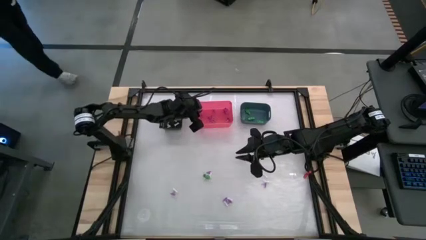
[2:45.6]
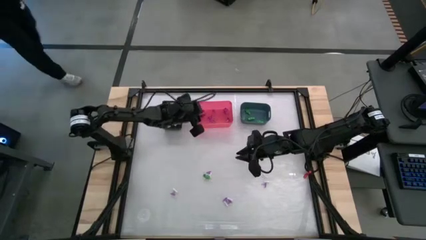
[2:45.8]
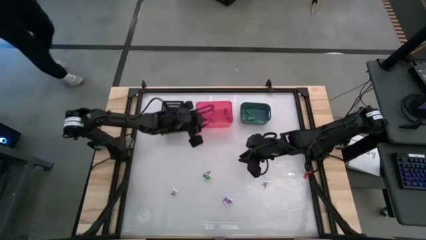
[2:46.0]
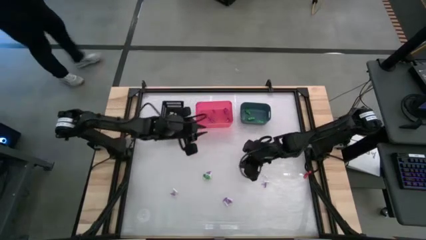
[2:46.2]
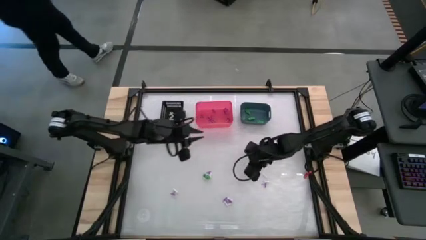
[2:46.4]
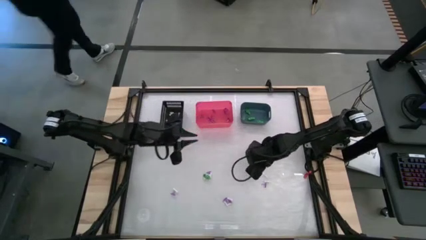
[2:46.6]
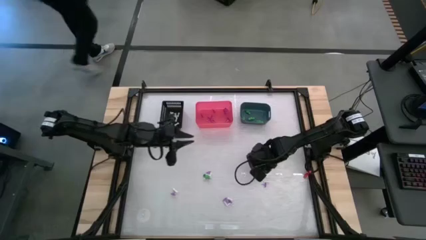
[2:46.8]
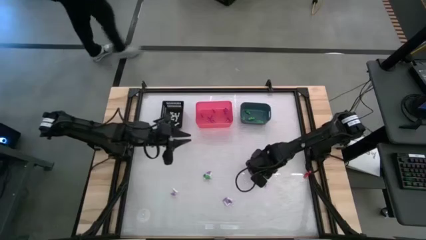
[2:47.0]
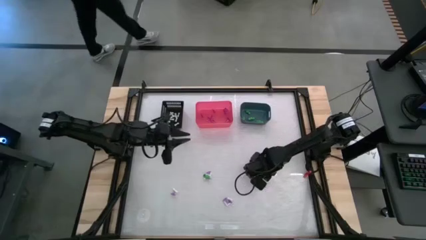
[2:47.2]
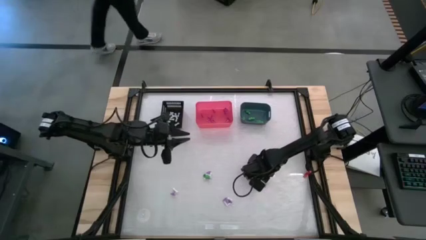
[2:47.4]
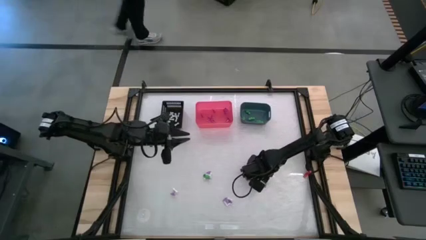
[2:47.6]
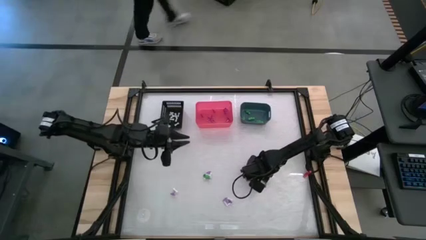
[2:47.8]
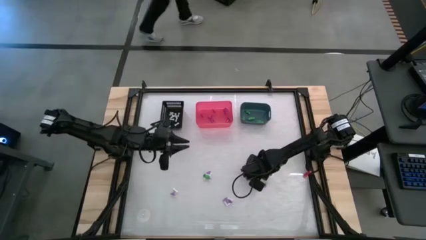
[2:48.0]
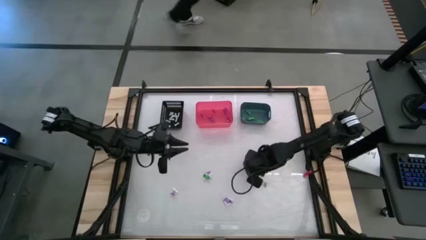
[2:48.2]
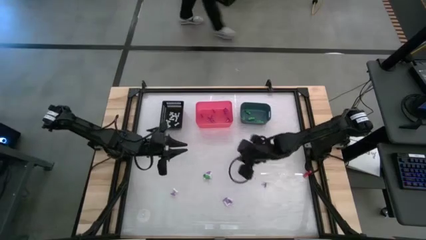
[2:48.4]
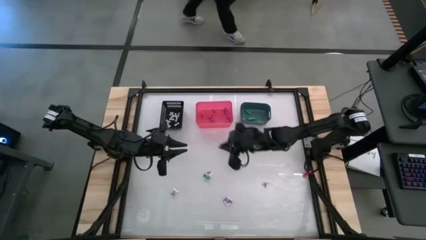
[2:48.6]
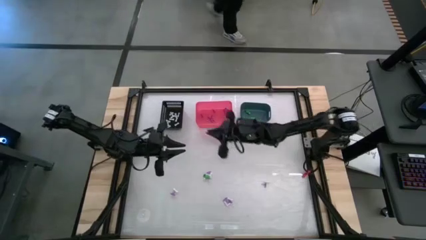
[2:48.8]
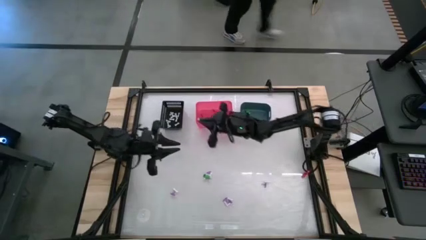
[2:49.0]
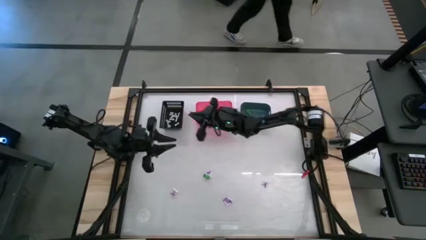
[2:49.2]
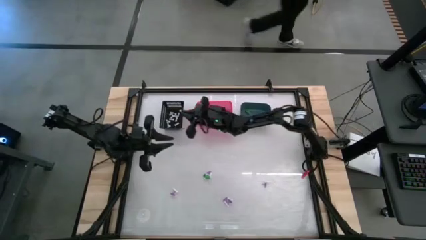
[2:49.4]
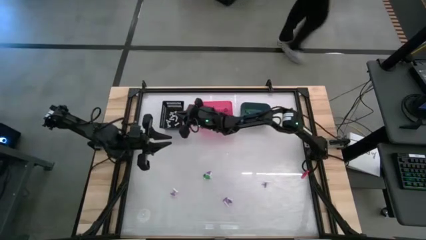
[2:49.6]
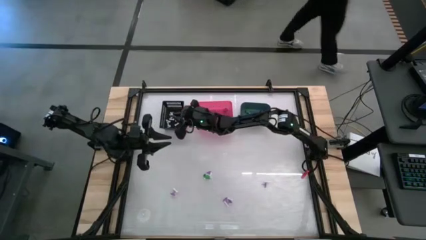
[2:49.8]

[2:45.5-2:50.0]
Task: Sort Halloween decoration
Put the white bone toy into the black bin

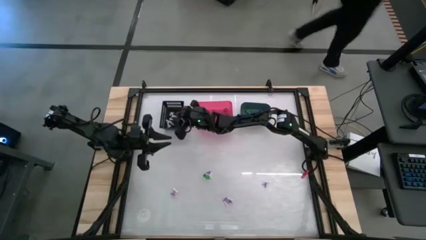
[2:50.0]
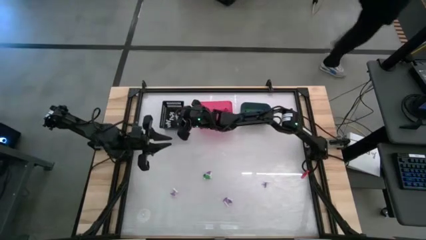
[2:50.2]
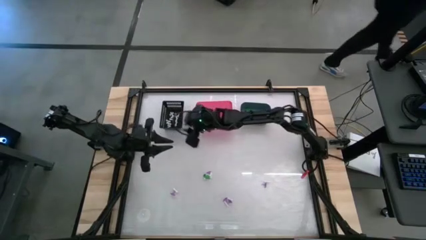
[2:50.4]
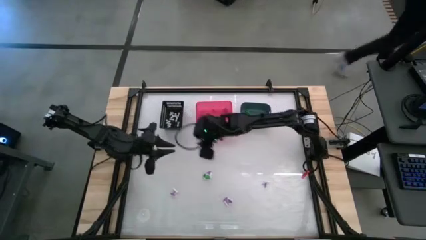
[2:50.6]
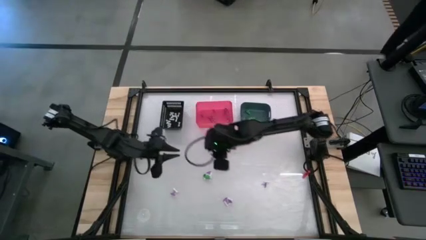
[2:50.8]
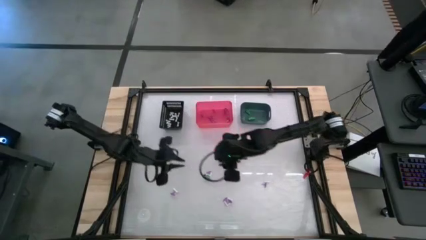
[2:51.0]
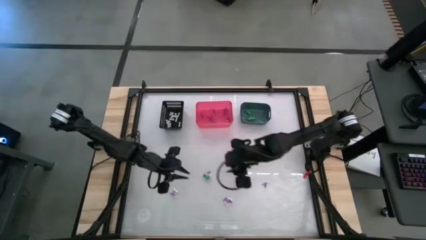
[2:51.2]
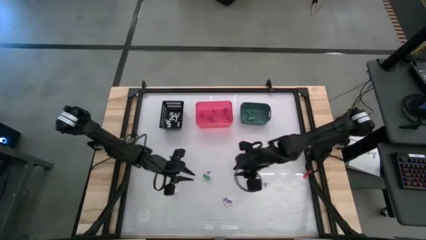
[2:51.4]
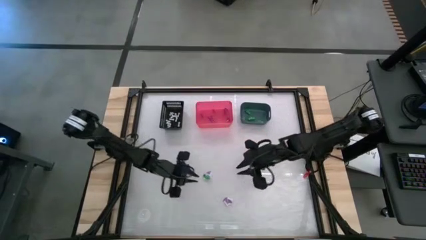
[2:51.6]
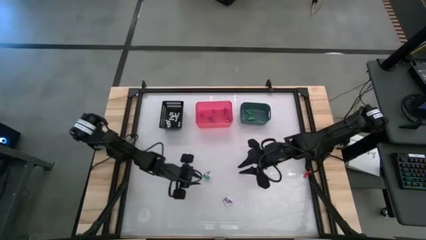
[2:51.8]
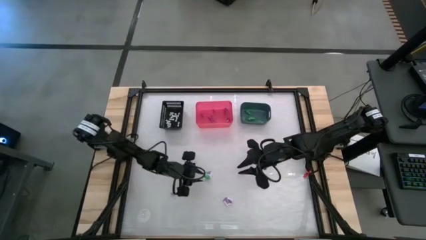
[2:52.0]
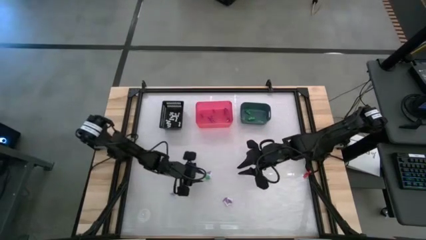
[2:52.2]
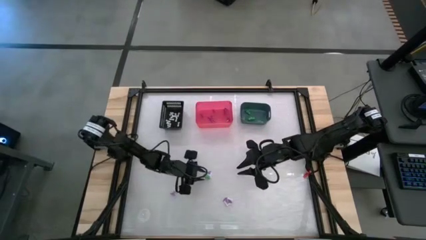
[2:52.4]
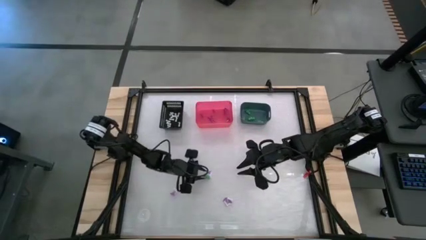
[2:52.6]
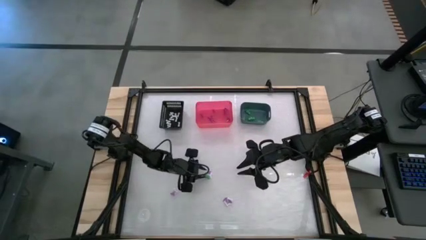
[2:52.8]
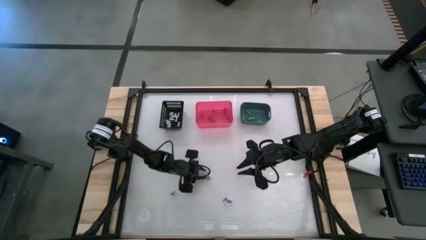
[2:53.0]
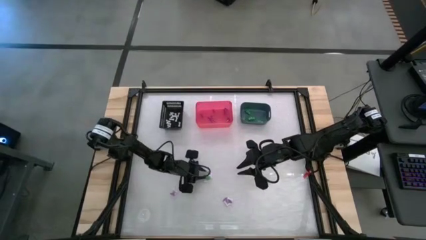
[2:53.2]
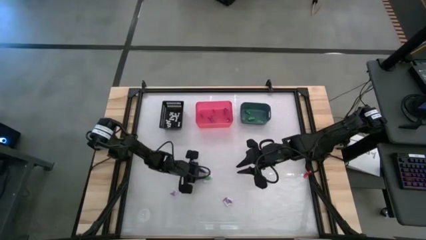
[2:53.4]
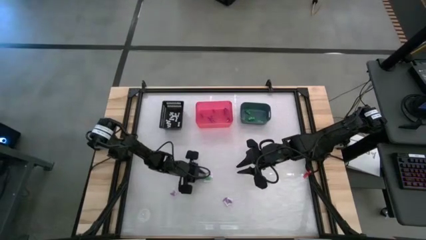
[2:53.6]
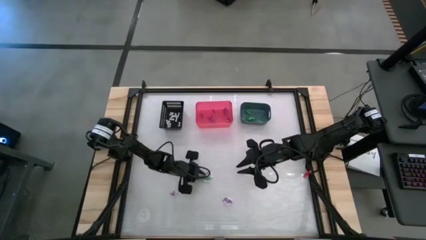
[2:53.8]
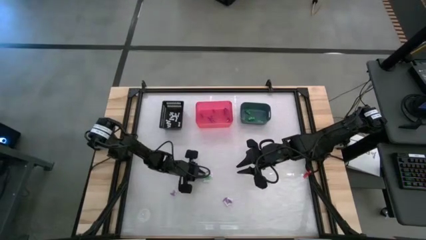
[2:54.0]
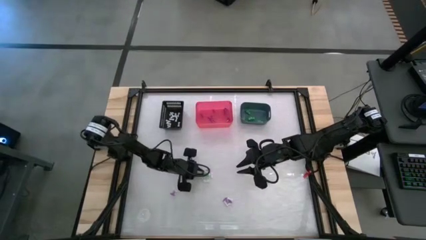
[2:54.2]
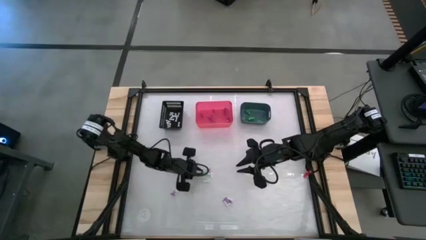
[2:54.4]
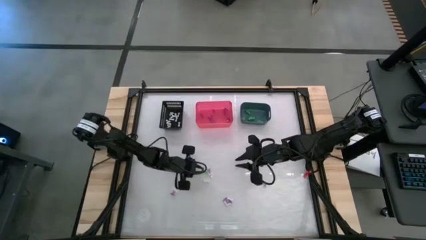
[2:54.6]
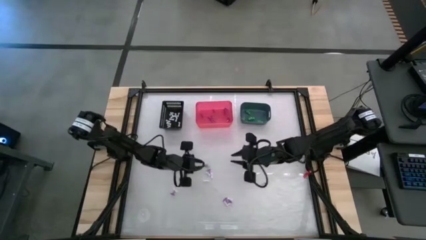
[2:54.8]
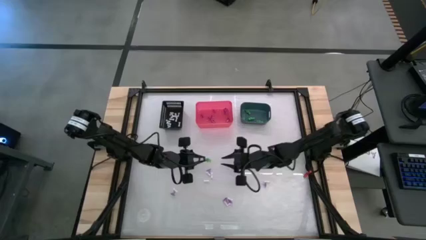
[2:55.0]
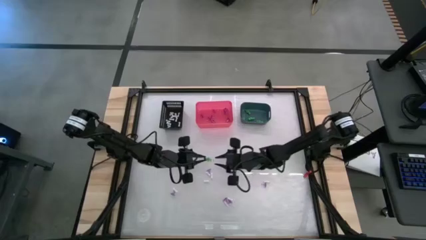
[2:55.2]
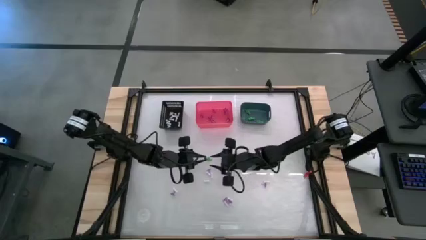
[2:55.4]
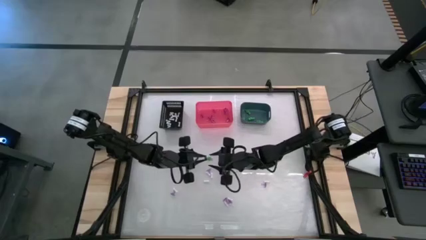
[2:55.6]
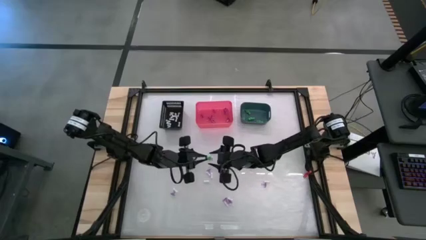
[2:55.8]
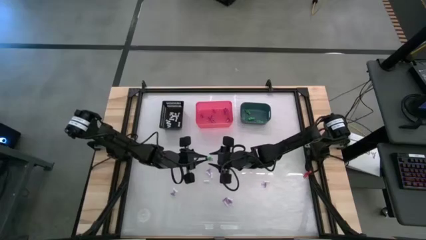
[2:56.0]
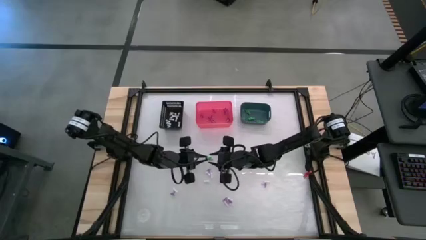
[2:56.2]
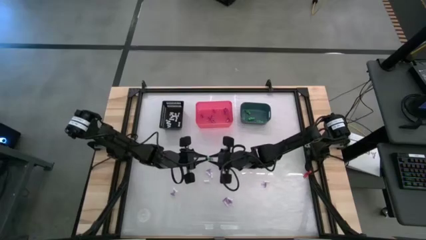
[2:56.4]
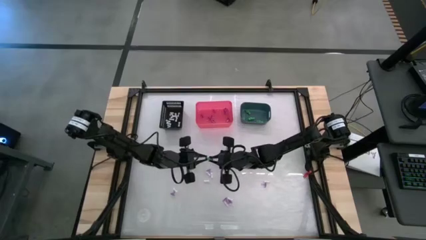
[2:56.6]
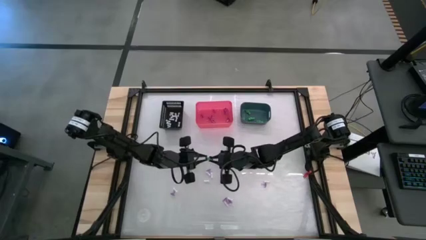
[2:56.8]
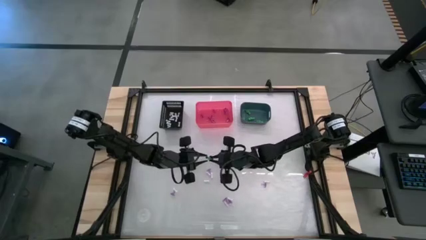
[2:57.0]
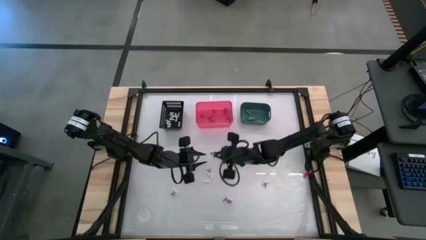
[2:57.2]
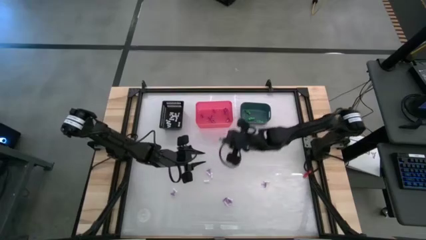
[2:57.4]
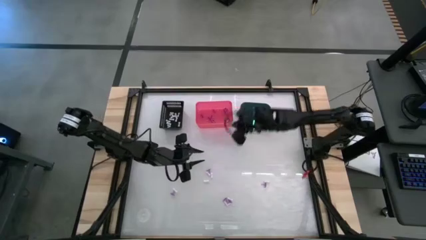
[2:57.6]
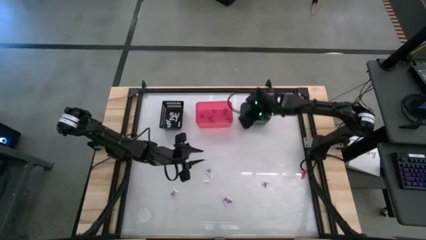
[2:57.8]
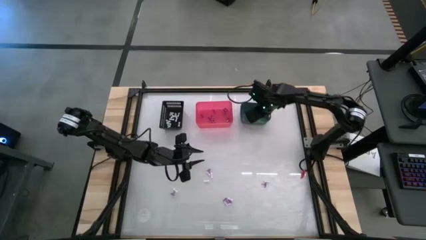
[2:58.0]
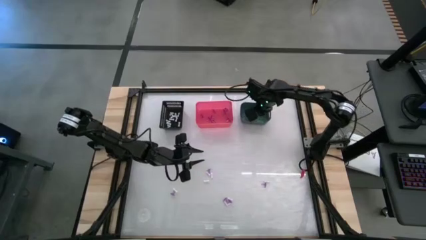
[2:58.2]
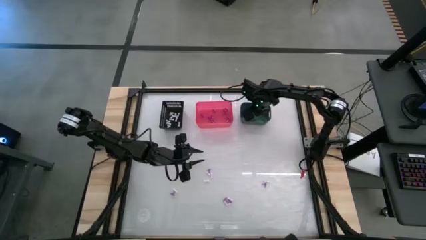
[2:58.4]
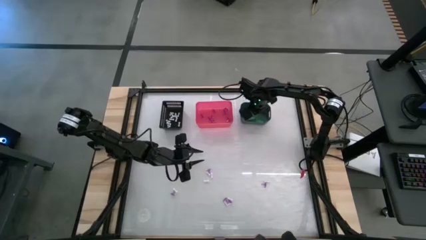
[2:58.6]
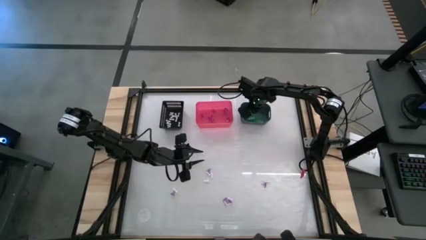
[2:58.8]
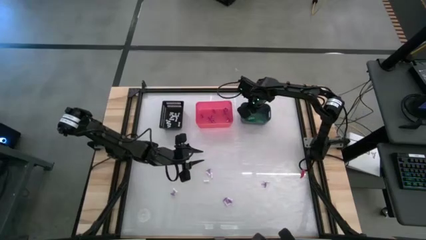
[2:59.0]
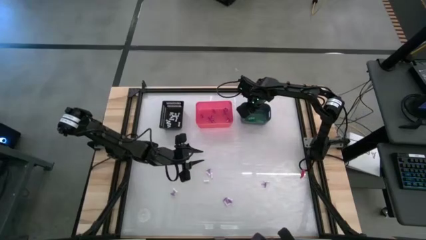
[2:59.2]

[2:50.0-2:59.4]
Put the green skeleton toy into the blue bin

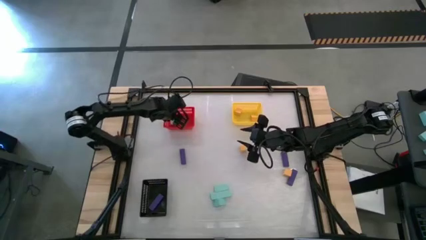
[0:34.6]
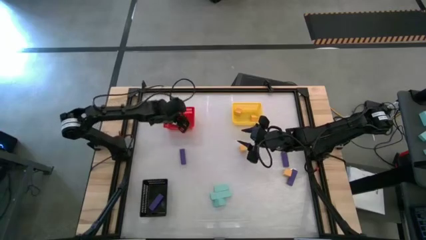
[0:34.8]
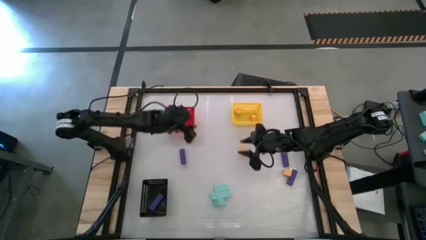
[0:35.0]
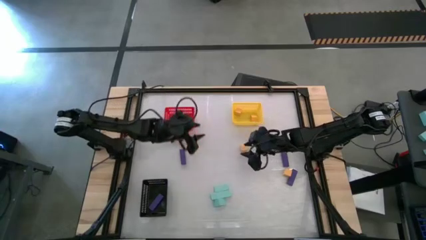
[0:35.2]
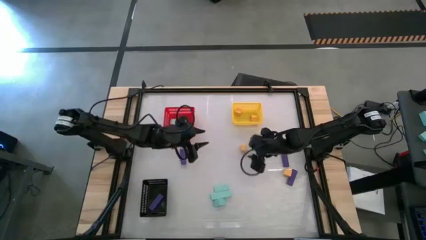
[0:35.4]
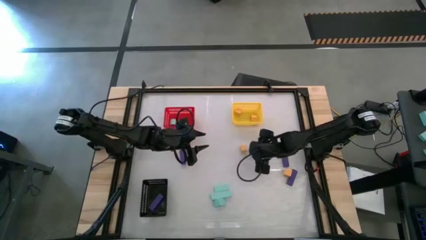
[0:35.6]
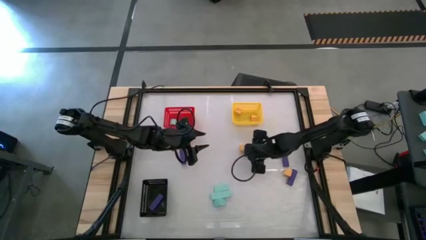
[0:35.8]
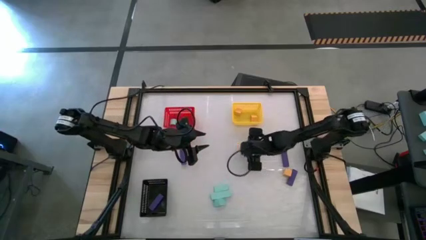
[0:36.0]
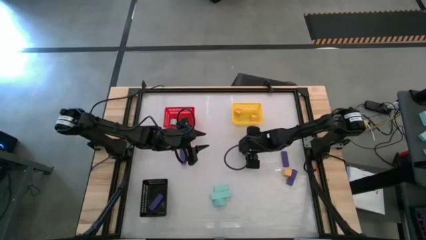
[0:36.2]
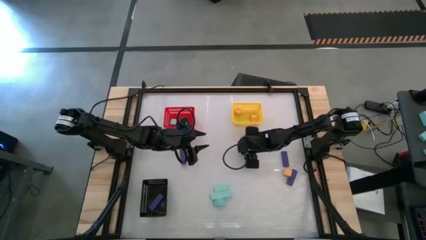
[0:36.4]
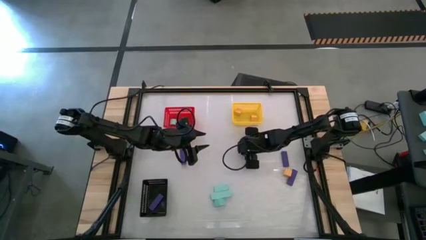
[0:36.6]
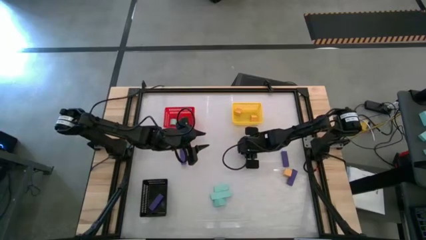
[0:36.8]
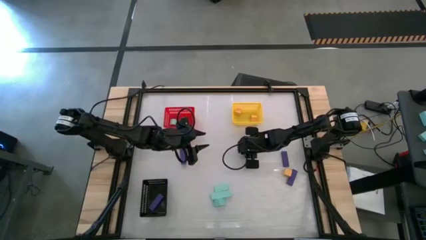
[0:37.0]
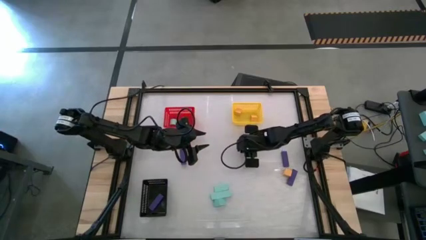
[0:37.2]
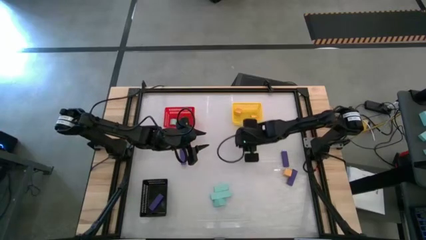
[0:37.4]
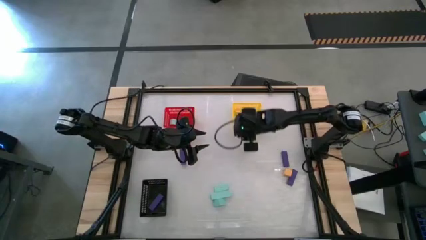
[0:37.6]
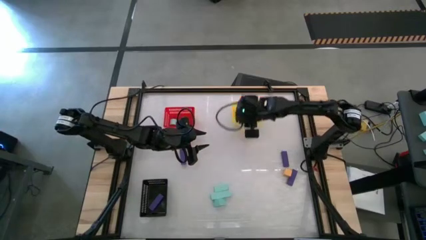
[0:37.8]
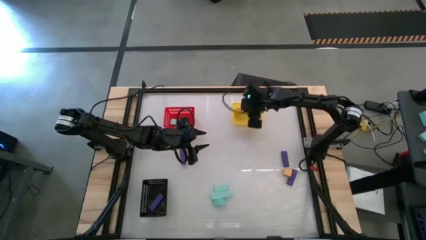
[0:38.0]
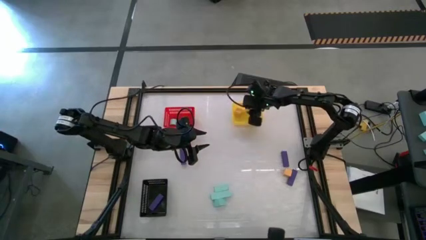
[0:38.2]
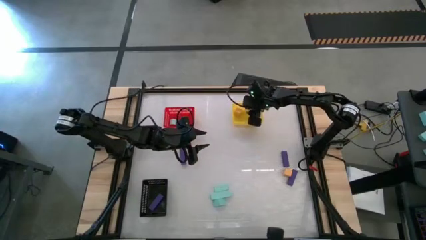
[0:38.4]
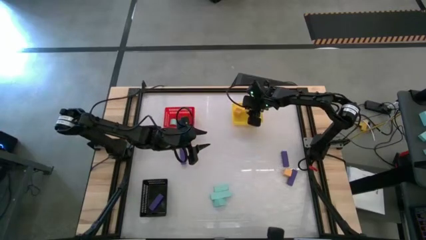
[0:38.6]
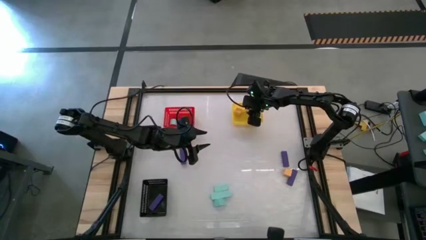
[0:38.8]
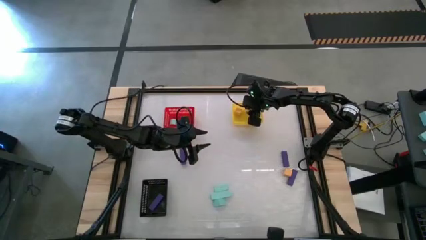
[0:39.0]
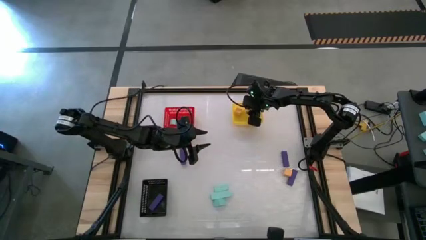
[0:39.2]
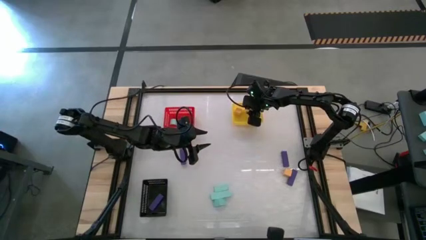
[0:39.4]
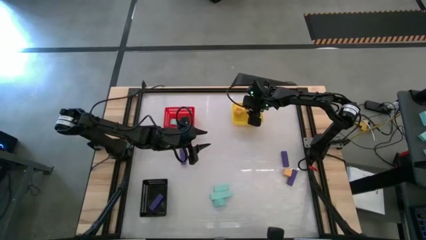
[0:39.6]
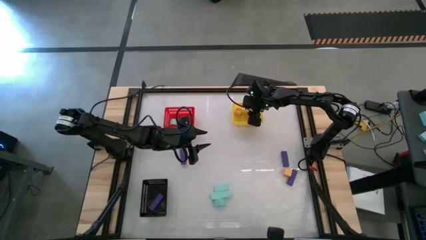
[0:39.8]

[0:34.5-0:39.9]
Task: Sort & place blocks by color
Put the yellow block into the yellow bin
